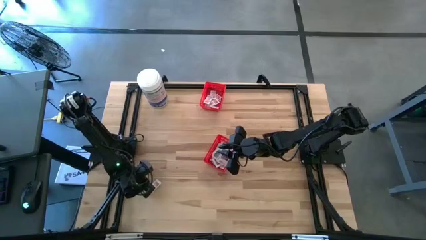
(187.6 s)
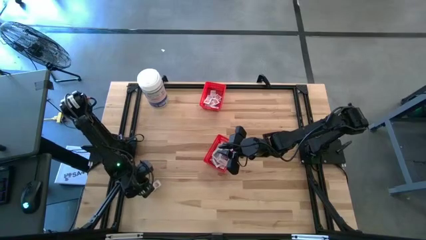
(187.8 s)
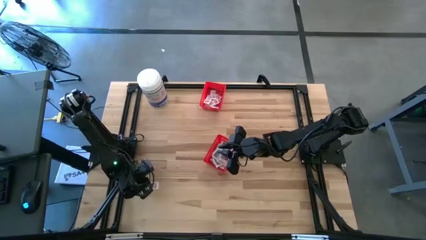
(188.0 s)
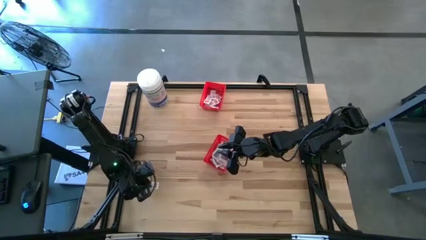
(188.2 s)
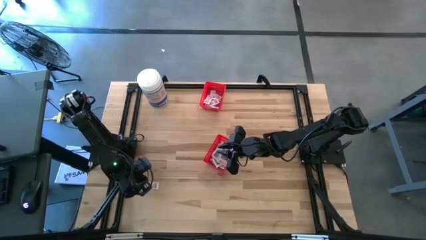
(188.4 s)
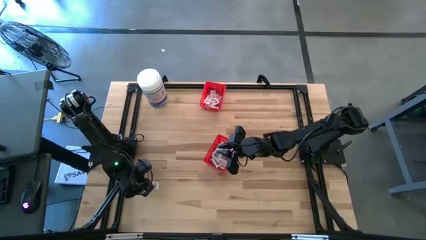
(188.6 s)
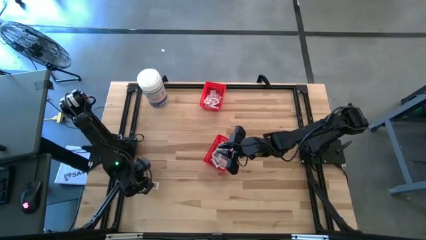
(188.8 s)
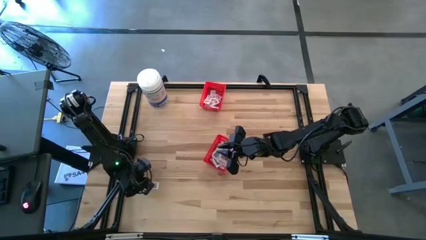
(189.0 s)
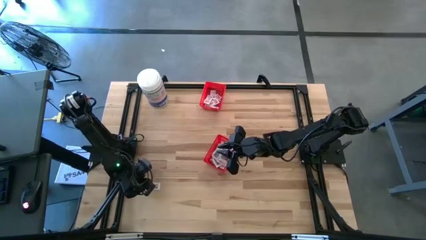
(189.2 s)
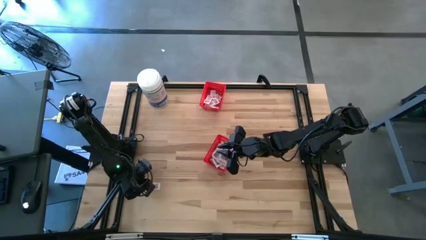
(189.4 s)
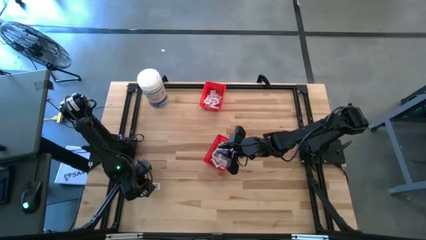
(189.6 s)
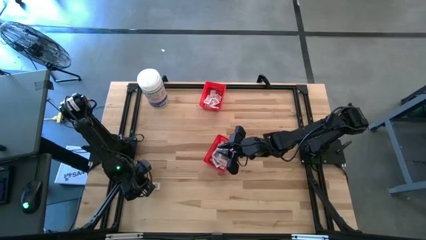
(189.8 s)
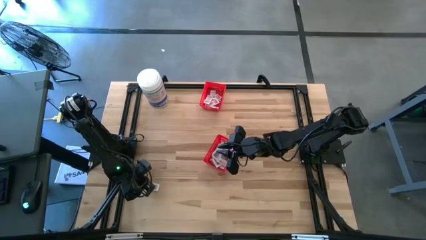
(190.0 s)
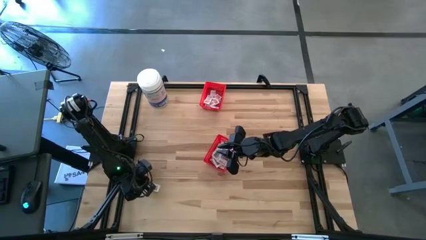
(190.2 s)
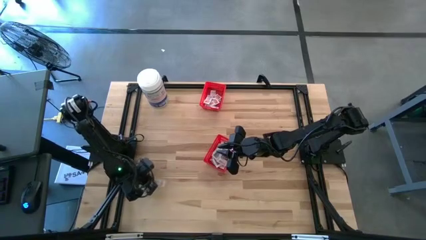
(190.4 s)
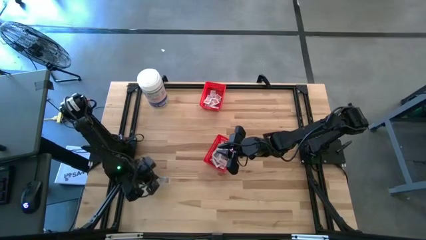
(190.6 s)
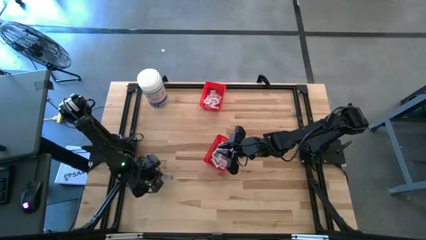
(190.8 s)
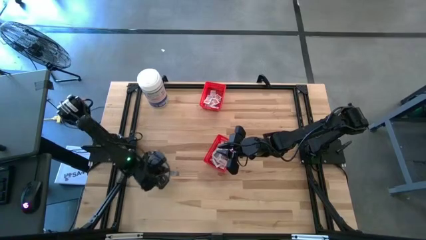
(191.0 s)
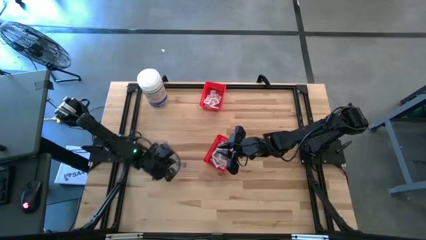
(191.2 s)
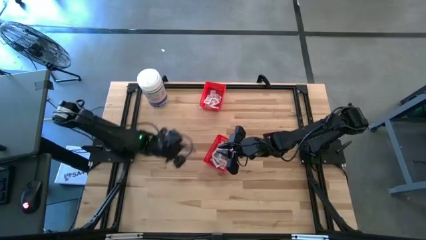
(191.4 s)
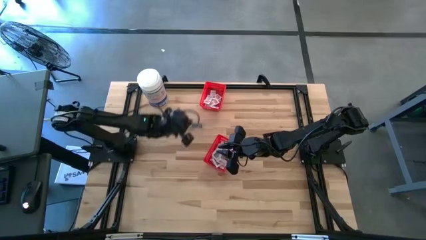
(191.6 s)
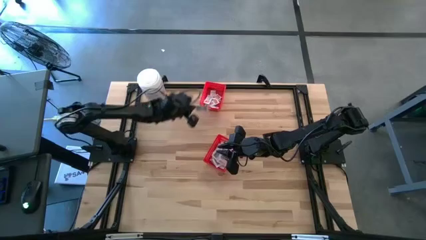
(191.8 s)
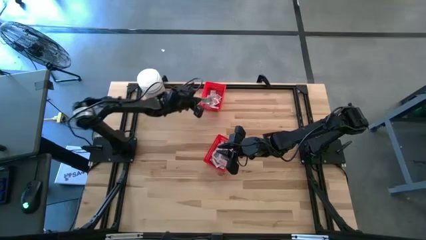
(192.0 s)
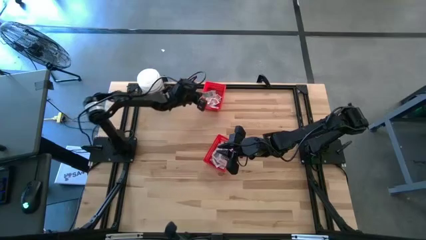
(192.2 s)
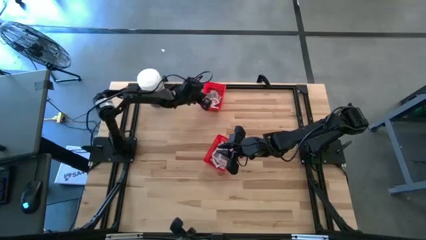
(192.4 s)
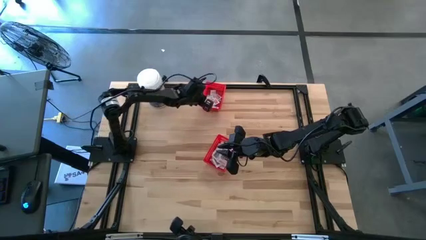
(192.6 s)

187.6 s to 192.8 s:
Task: Pick & Place First Aid Supplies
Put the white ointment pack into the top red bin

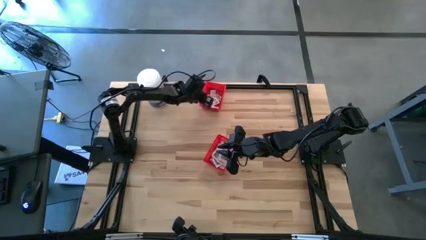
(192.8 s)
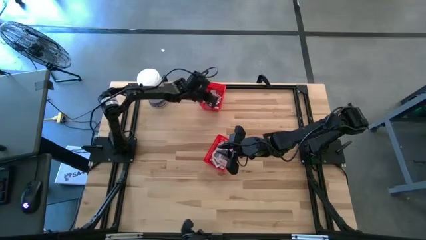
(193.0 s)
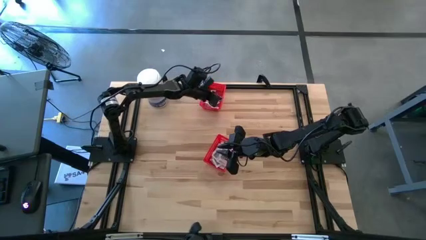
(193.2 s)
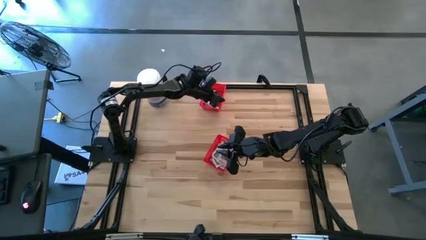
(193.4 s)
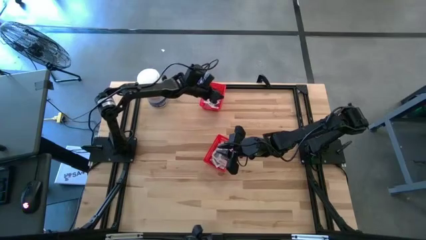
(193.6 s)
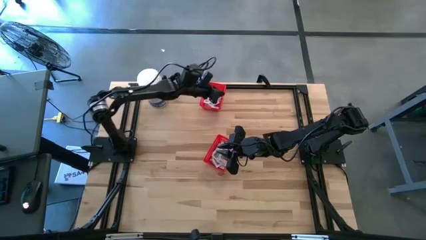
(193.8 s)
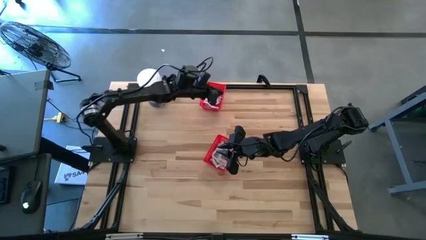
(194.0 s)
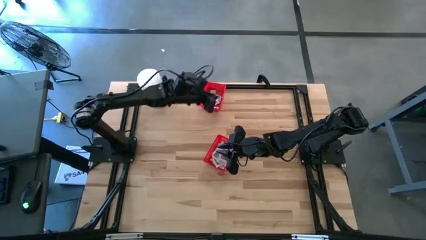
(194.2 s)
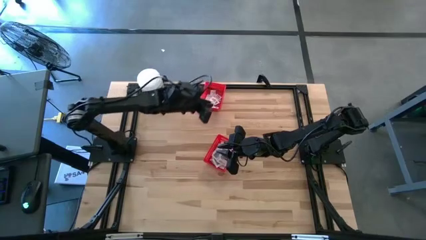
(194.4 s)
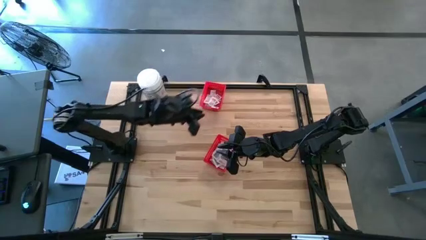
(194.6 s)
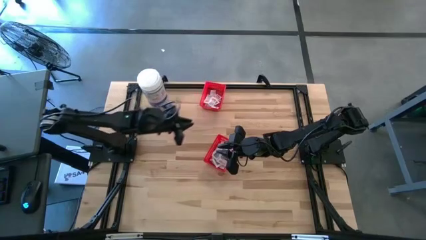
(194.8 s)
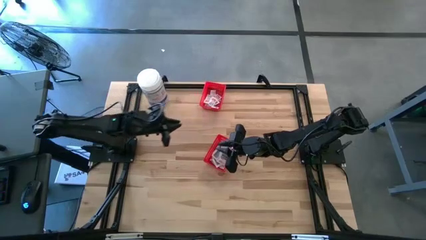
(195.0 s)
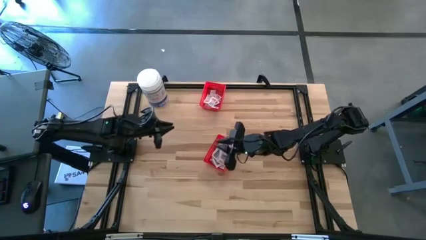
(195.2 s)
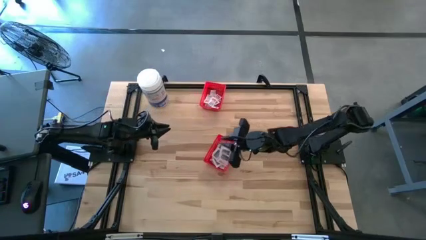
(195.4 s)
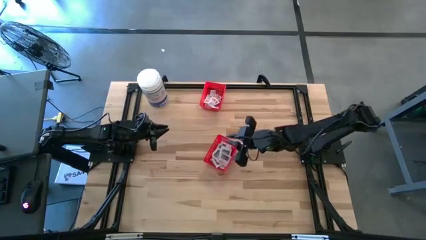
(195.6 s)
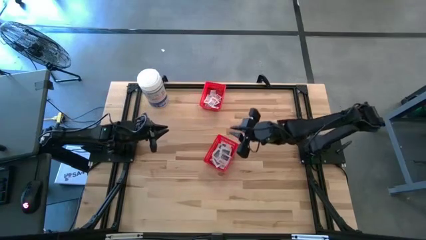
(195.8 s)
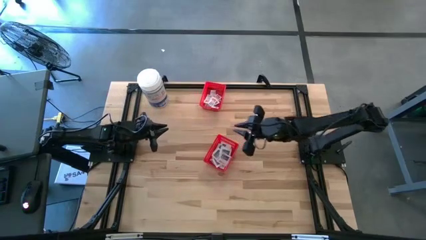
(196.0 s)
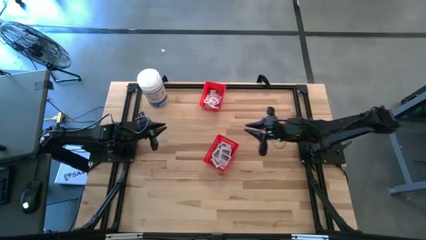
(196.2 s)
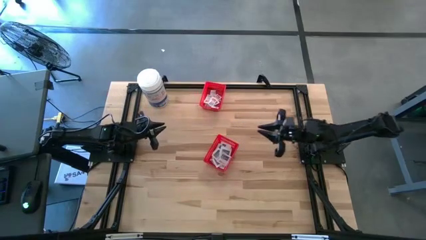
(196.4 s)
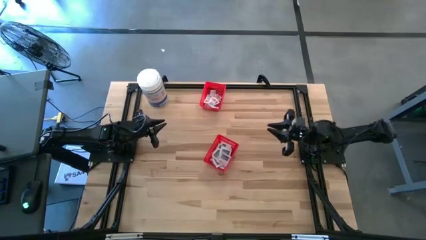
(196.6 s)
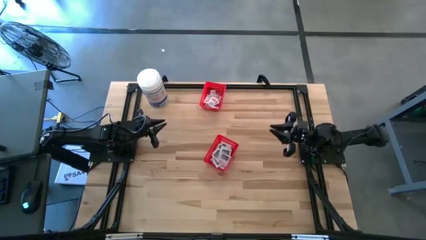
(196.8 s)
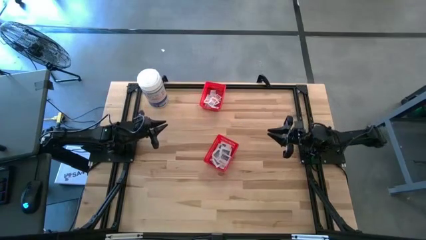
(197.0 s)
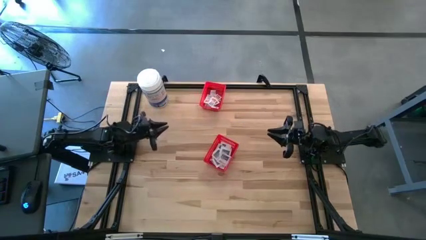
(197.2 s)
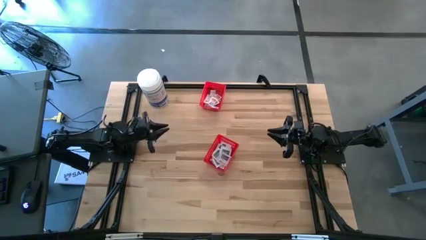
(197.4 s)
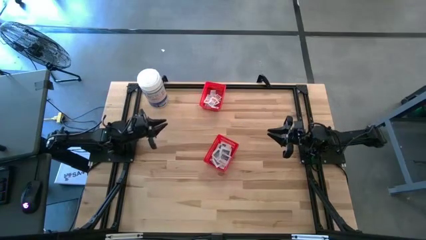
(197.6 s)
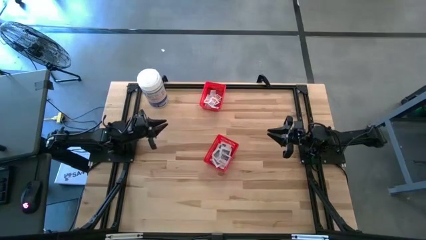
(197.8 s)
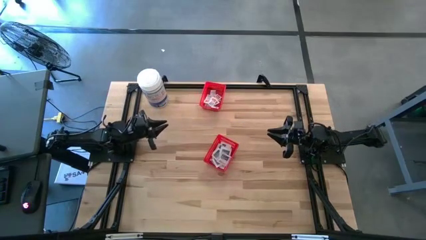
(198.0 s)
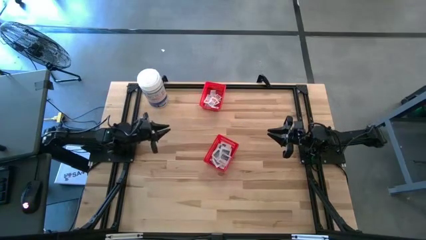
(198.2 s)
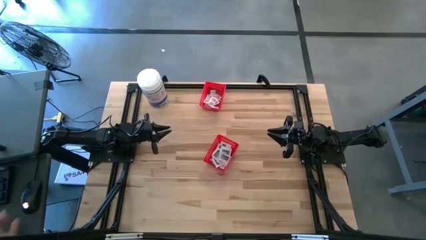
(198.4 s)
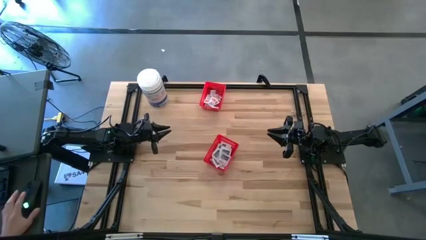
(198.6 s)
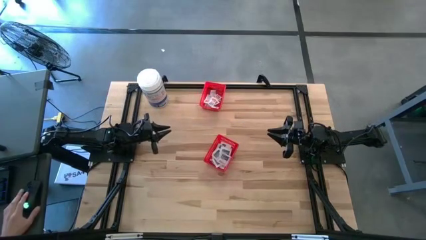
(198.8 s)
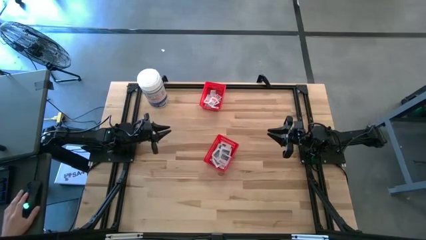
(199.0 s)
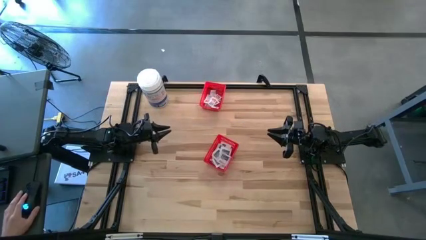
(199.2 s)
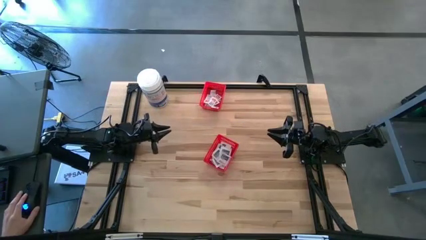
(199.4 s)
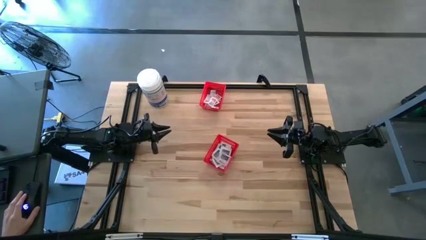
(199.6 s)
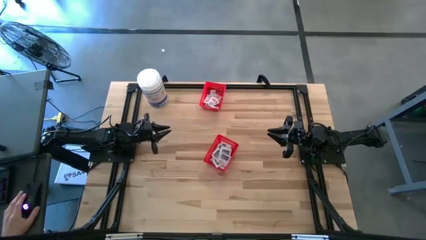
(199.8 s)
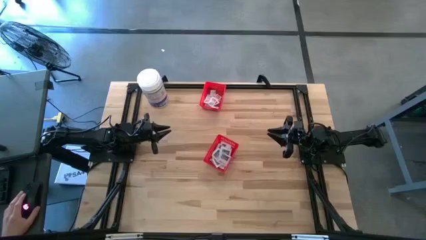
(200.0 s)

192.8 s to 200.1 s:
Return to Home Position
